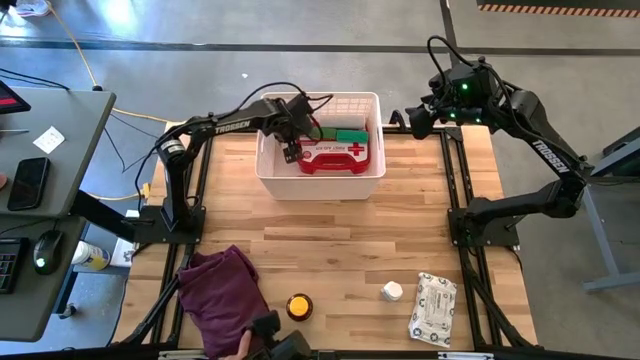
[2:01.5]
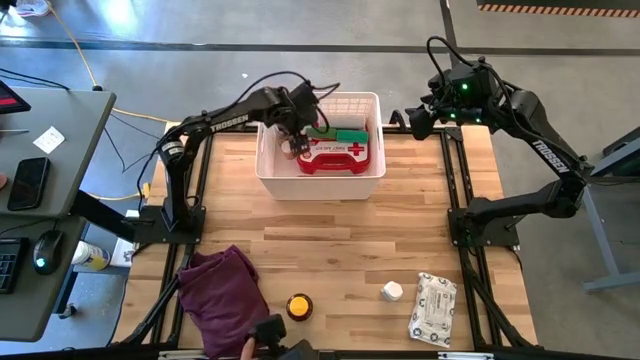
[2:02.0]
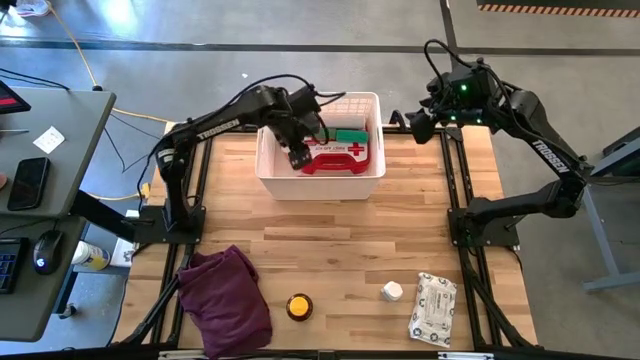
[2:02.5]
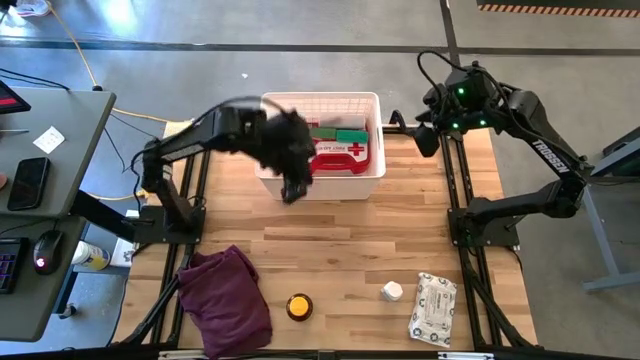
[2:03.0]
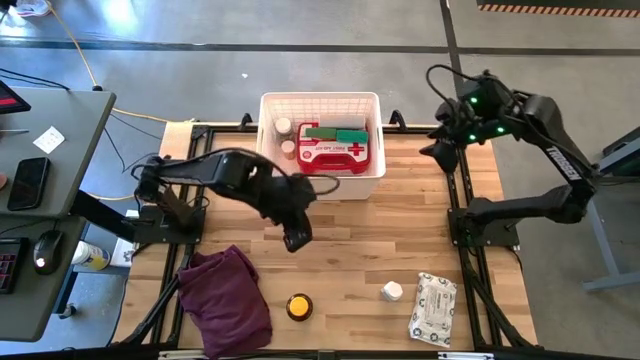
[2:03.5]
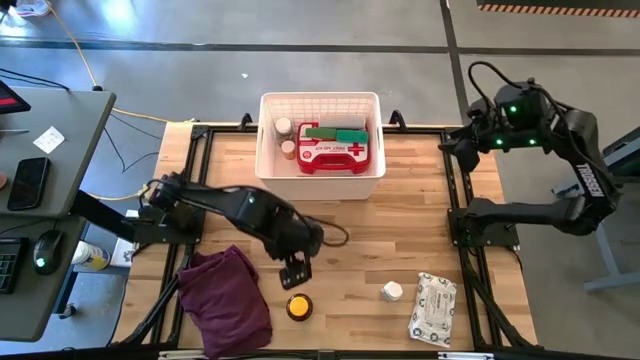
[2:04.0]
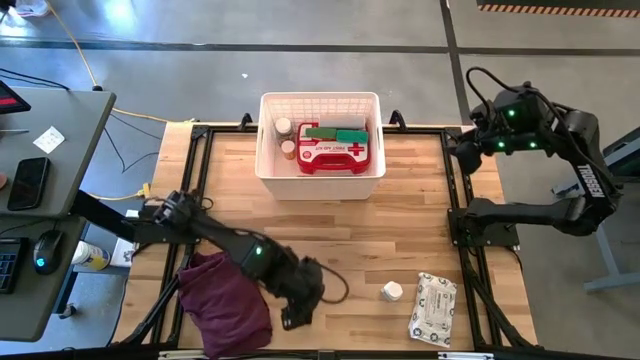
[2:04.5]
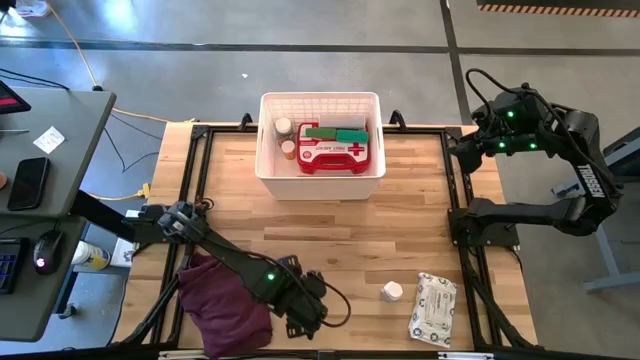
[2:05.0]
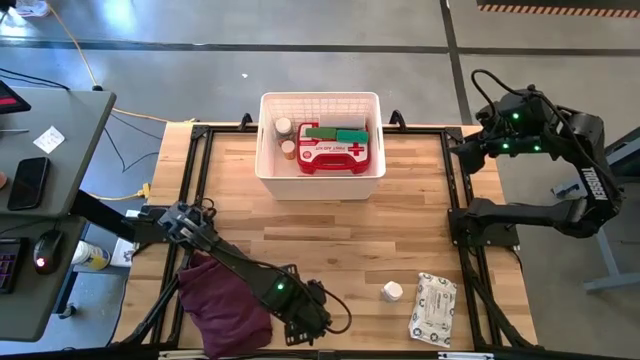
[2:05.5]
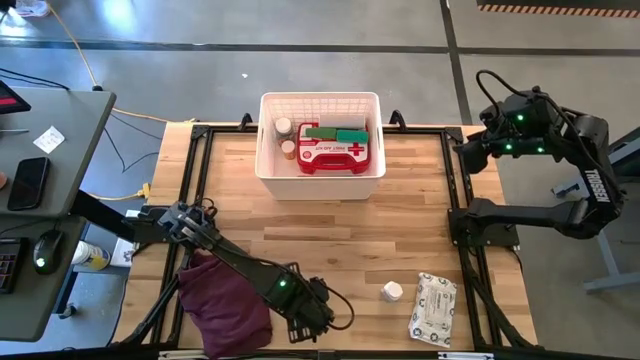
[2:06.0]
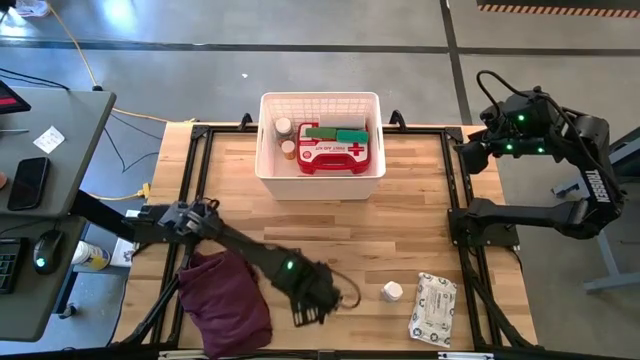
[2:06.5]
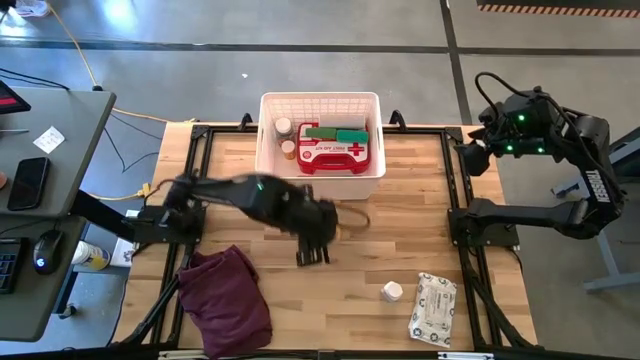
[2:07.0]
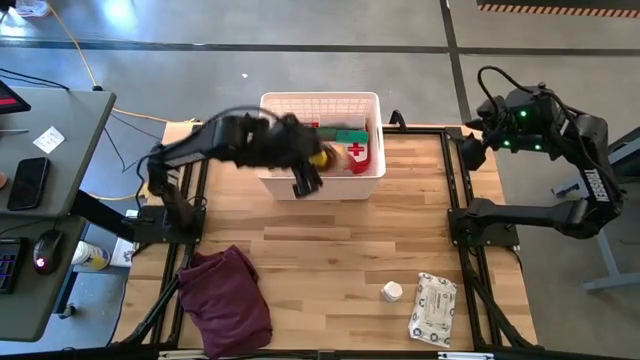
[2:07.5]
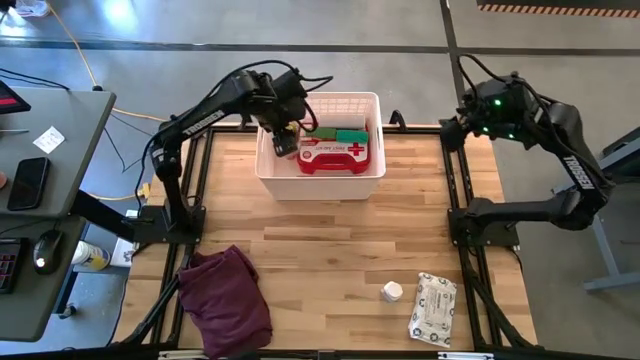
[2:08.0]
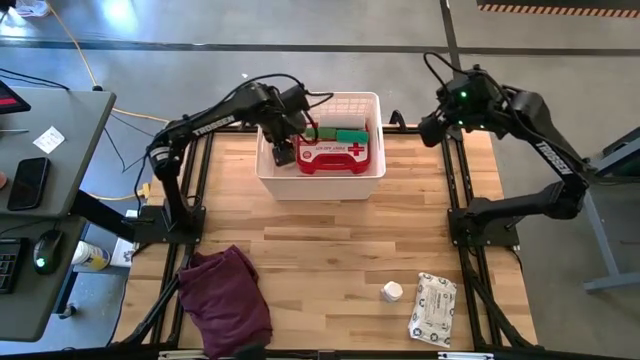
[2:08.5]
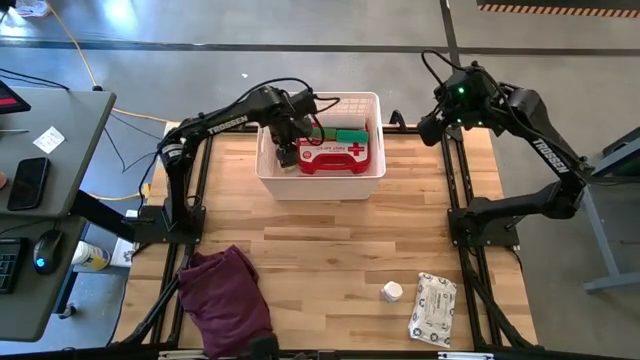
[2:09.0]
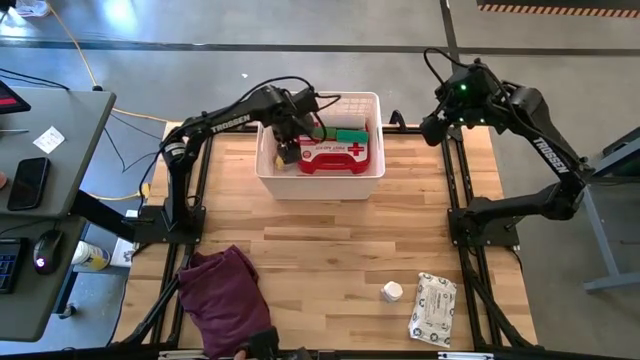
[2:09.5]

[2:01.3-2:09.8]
Task: Pick & place medical supplies in basket/bin
Put the yellow pill bottle into the white bin

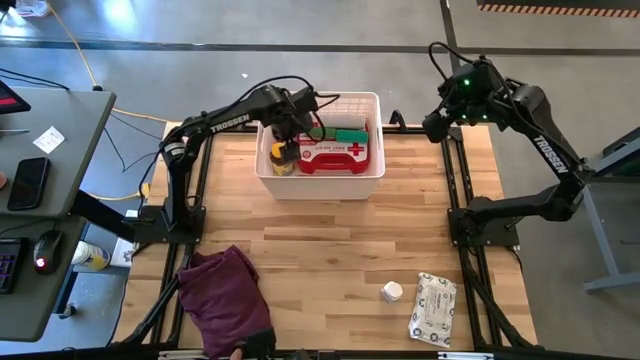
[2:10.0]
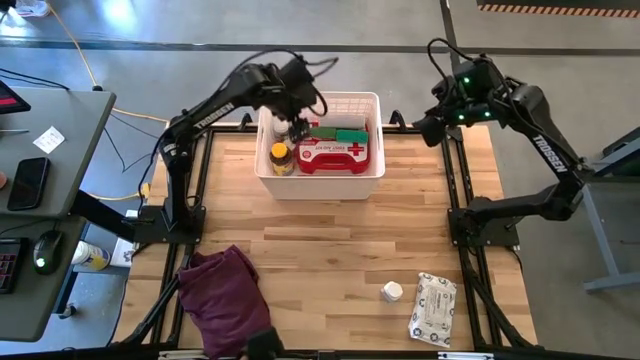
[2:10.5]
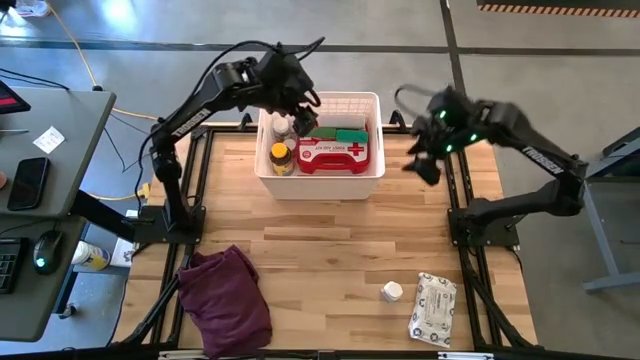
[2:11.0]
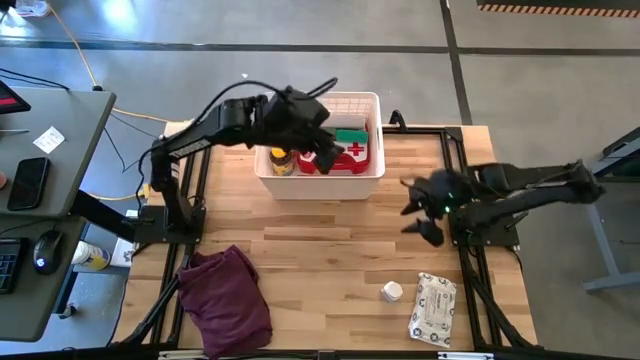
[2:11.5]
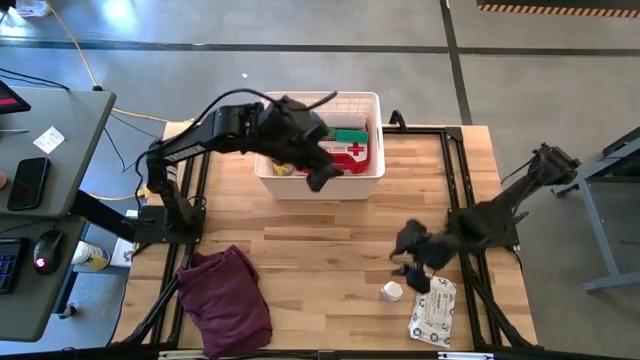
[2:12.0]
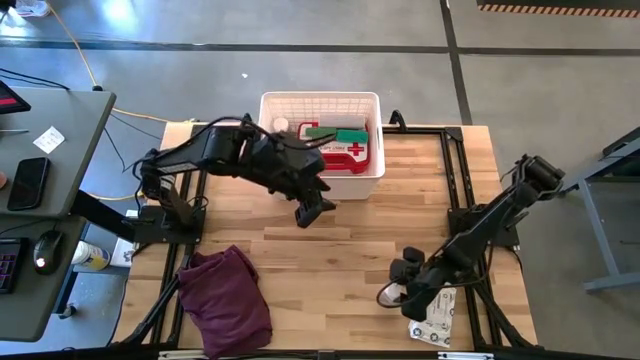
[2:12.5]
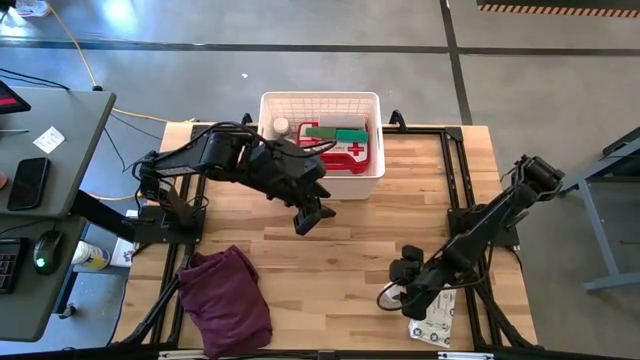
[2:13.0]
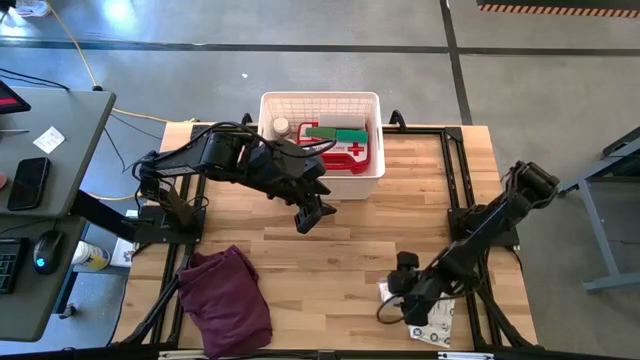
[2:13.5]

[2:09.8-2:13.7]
Put the white medicine bottle into the white bin

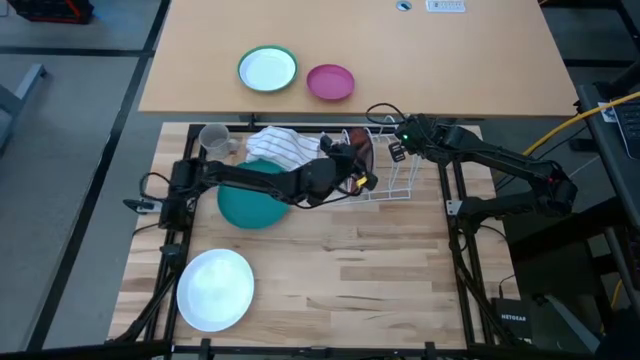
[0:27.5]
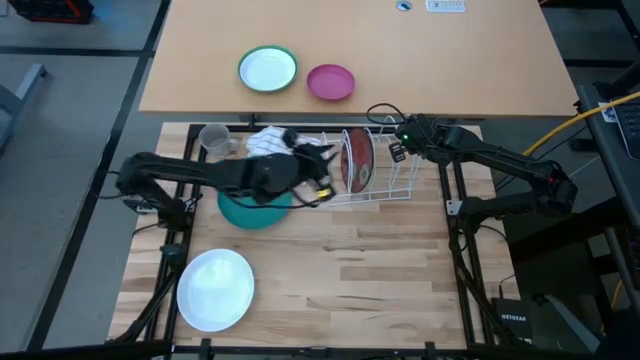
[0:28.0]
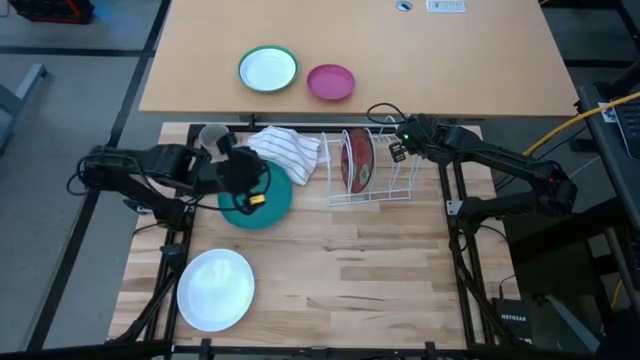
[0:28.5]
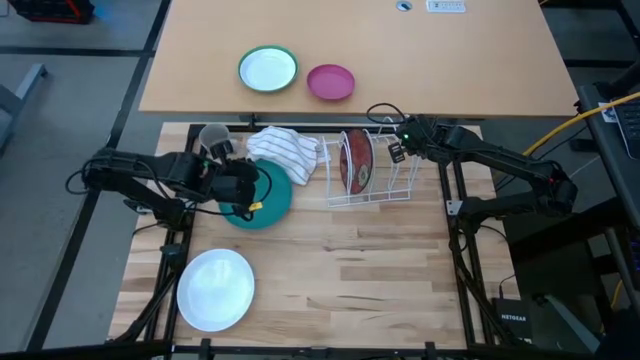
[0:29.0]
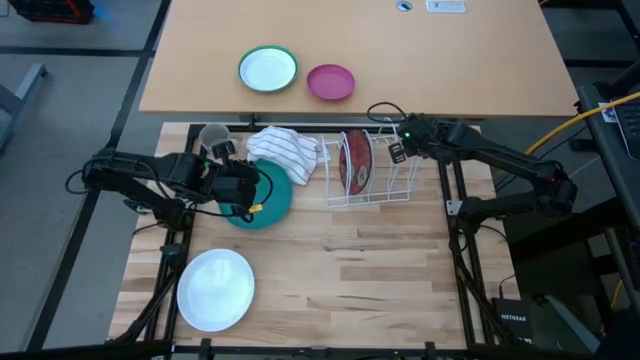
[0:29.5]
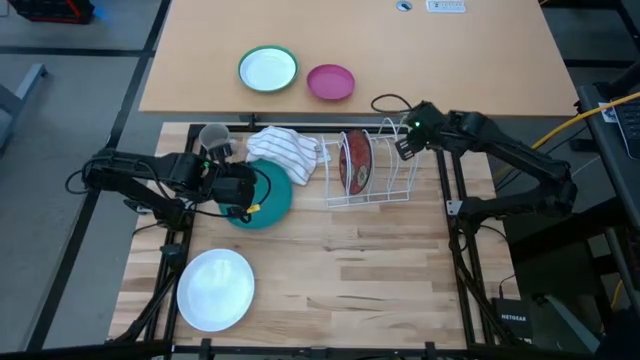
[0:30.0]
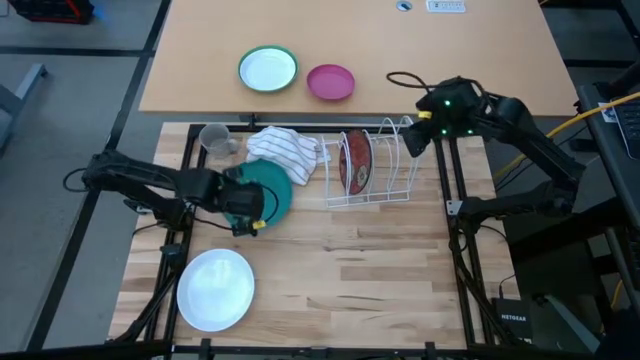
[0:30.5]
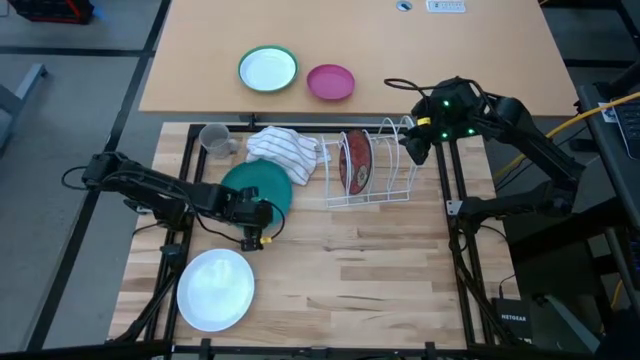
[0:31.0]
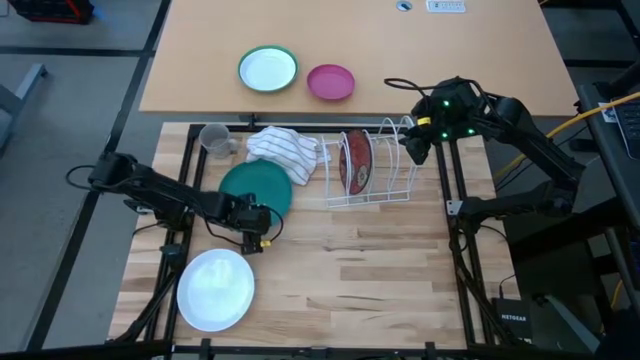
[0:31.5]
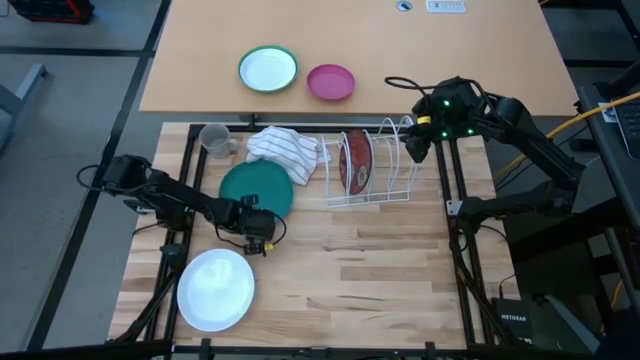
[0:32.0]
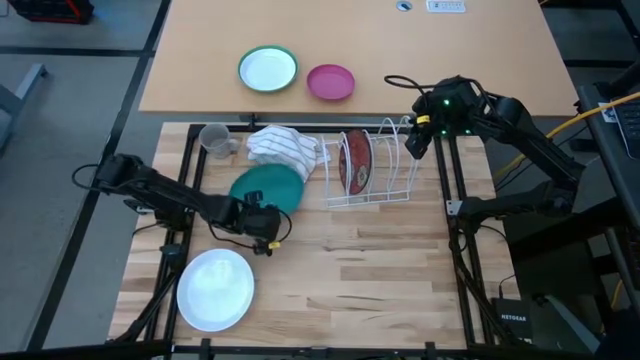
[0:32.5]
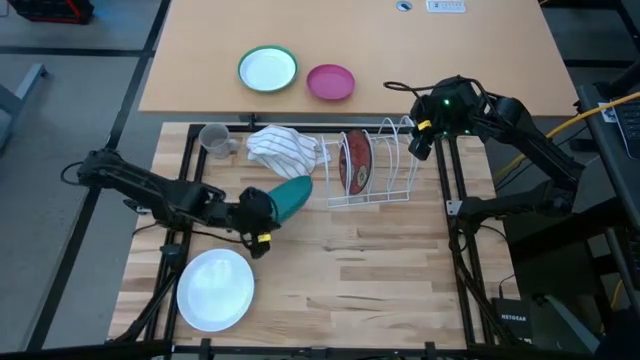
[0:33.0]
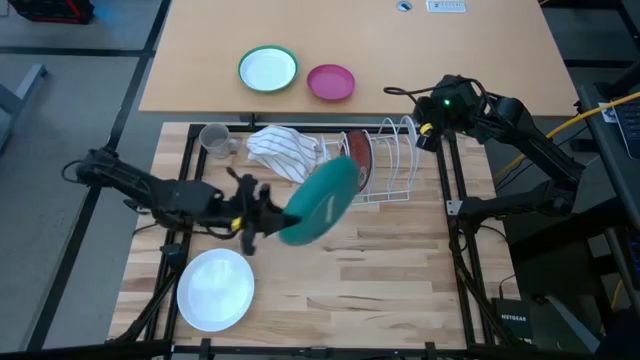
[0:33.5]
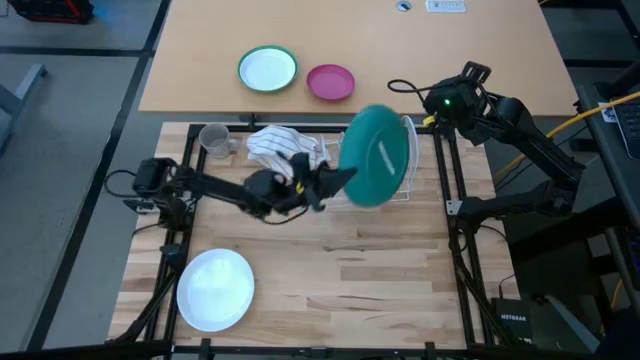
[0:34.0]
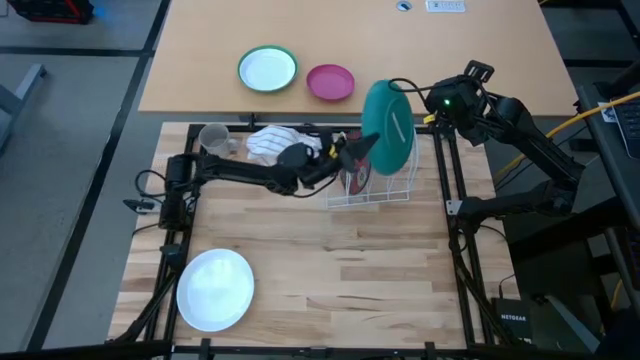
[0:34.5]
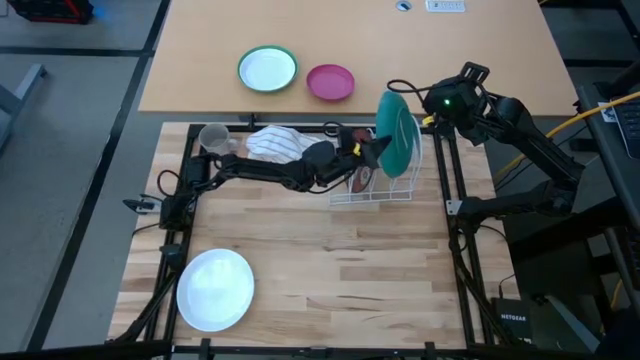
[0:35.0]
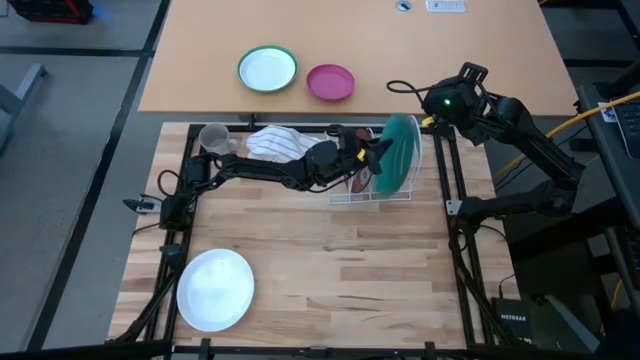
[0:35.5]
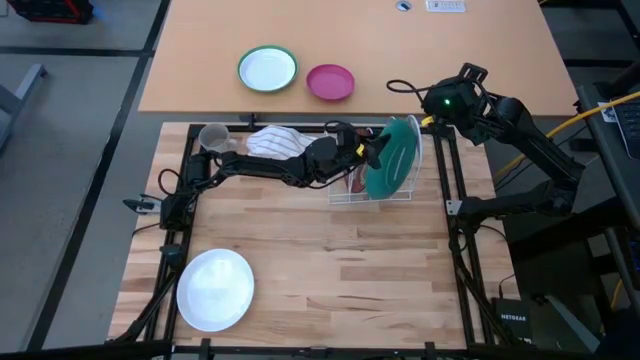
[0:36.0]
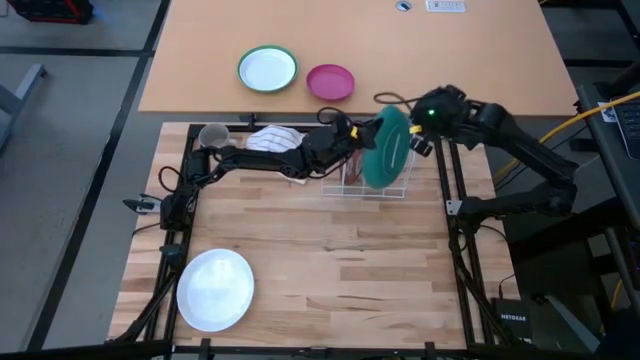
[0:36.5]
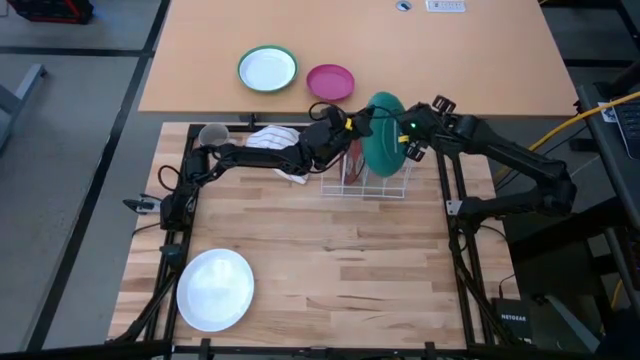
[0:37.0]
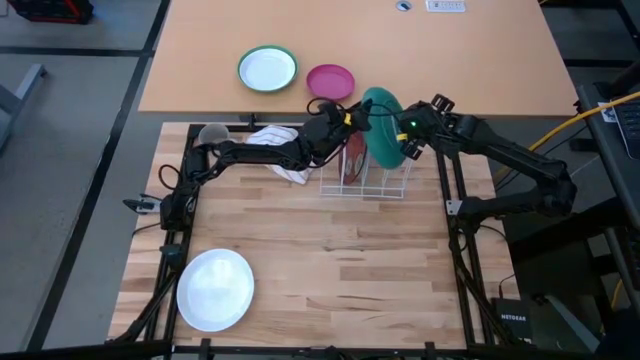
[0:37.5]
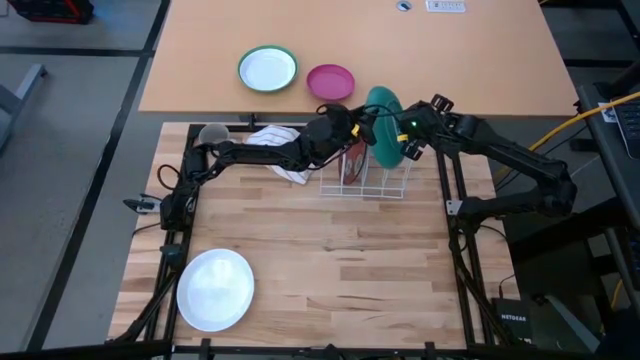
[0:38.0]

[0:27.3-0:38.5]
Task: Sort dishes
Put the green plate in the dish rack
